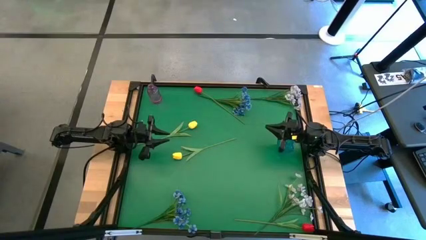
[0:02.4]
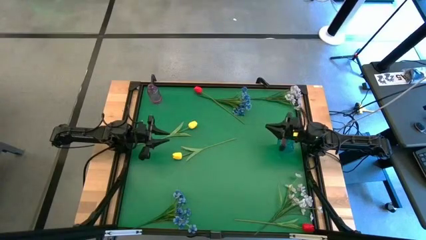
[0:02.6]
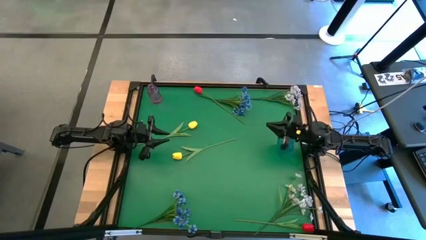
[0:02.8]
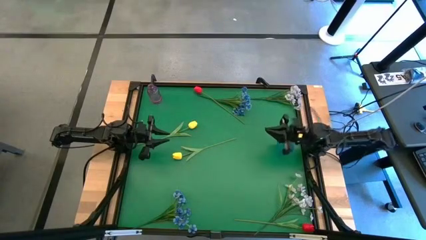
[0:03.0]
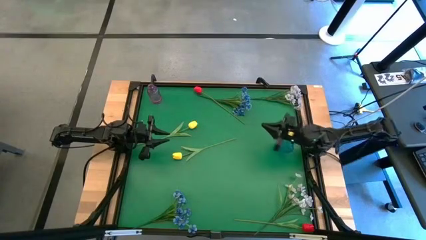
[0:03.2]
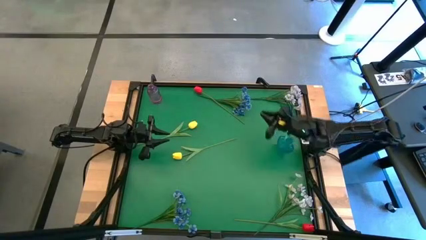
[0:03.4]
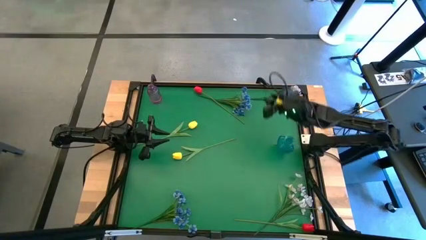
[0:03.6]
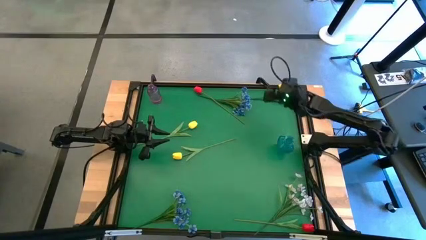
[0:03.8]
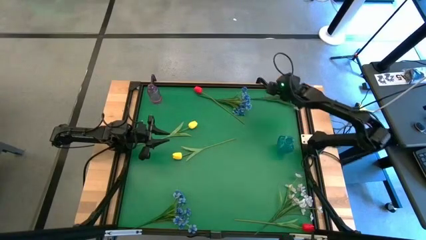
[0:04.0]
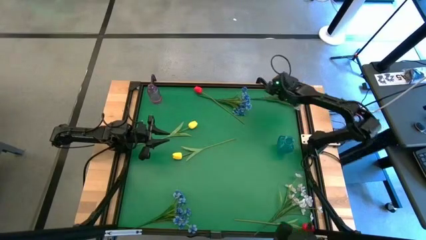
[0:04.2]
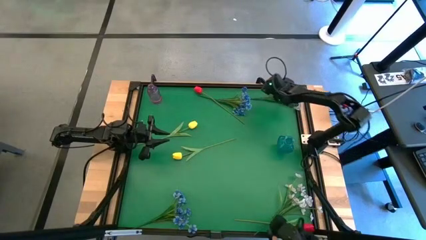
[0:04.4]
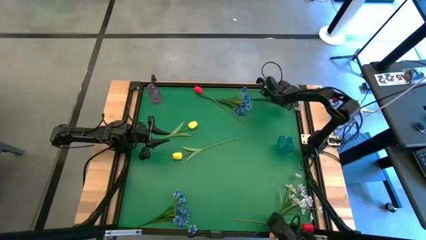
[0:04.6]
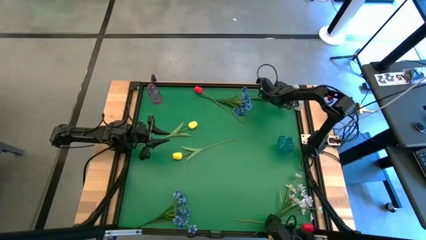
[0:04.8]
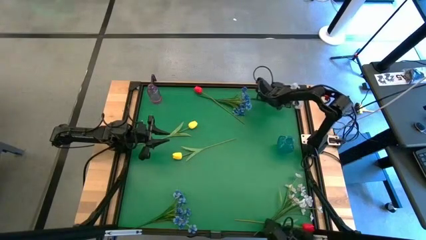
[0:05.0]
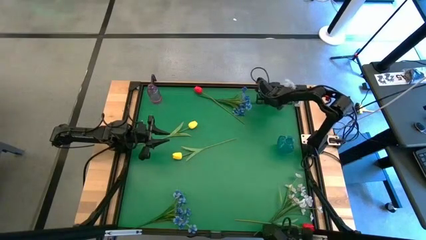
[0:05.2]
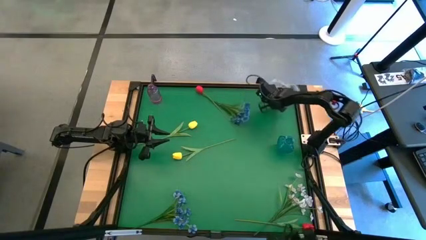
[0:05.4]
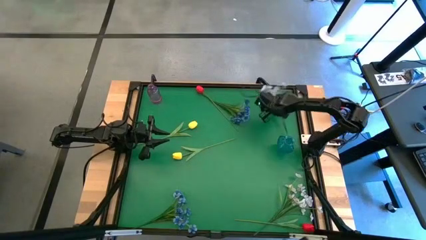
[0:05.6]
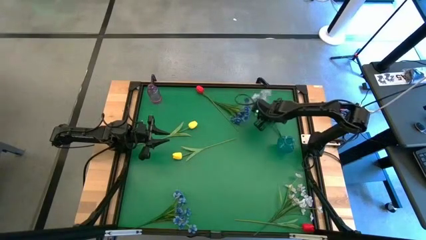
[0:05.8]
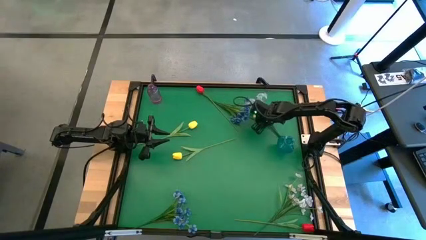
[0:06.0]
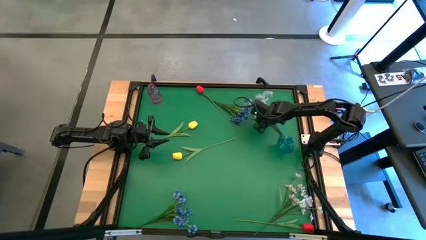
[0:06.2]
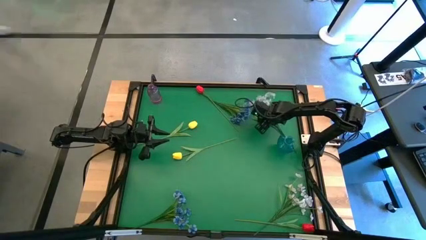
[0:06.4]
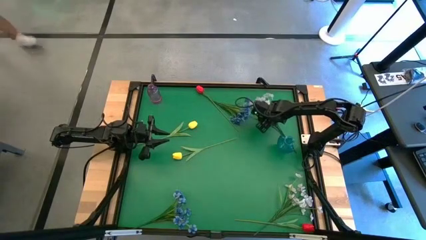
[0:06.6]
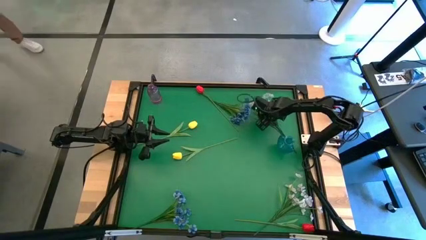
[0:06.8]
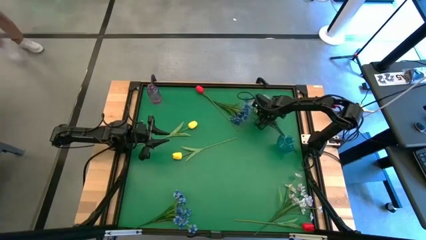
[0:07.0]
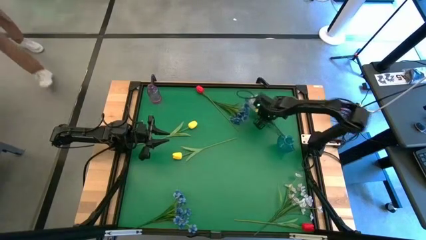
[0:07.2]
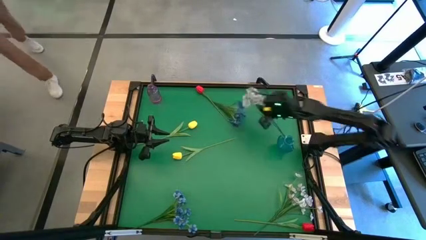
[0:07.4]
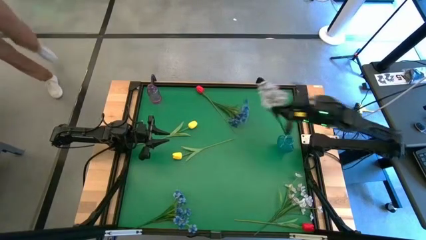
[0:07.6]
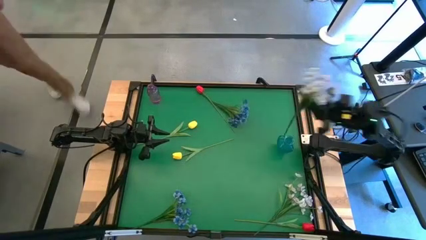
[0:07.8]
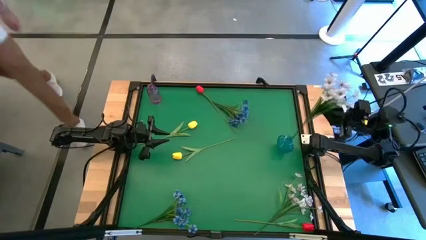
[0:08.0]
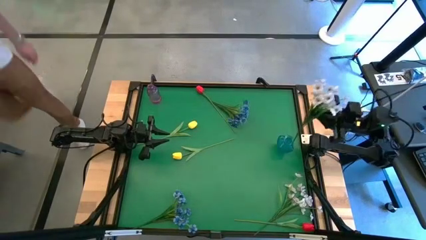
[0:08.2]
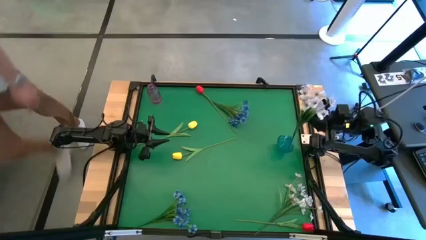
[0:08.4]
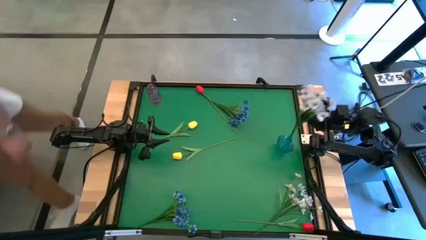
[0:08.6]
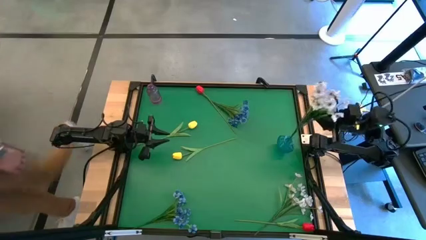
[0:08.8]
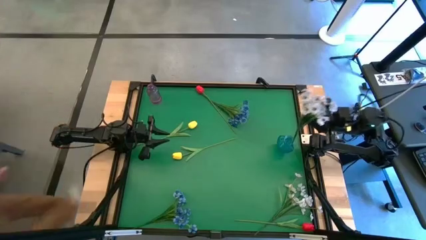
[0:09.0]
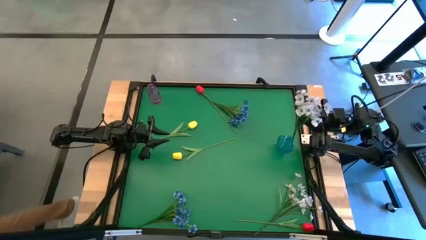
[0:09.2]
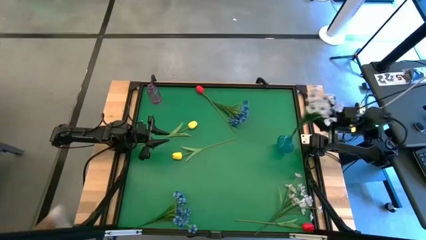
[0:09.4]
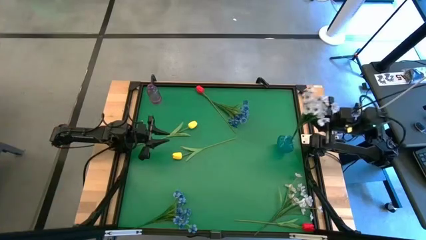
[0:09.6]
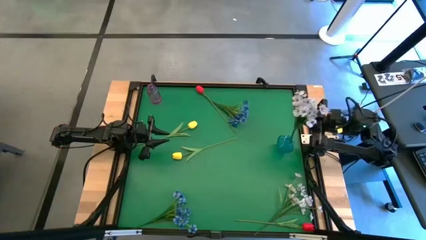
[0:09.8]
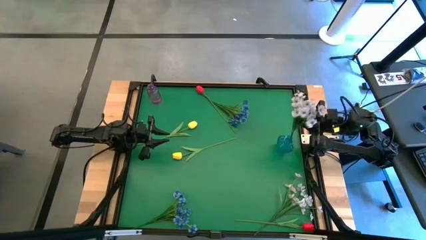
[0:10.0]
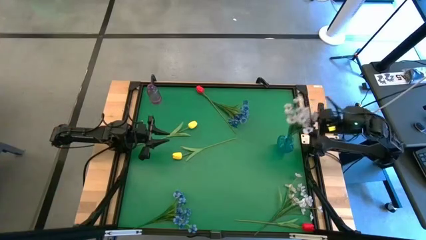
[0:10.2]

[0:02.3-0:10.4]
Task: Sort flowers into vase by color
Put the top white flowers into the blue vase

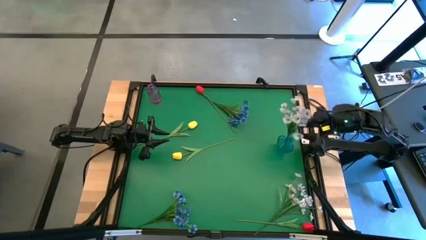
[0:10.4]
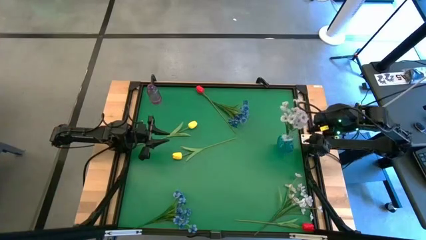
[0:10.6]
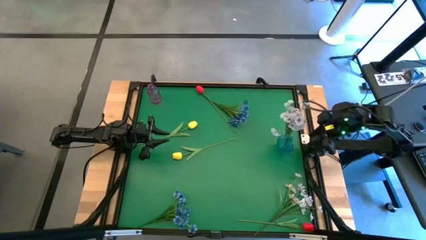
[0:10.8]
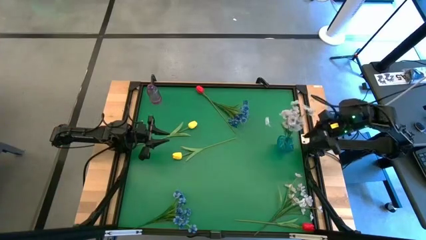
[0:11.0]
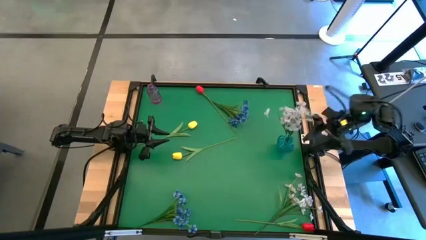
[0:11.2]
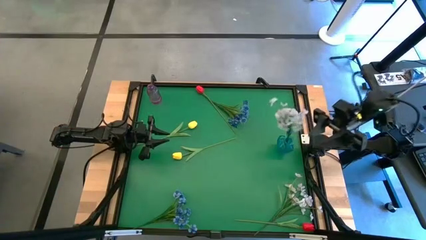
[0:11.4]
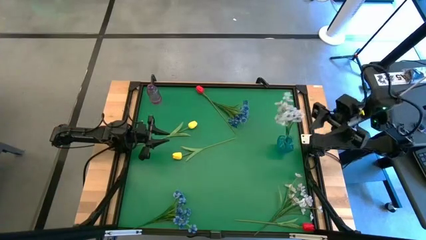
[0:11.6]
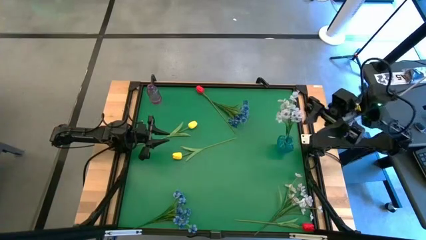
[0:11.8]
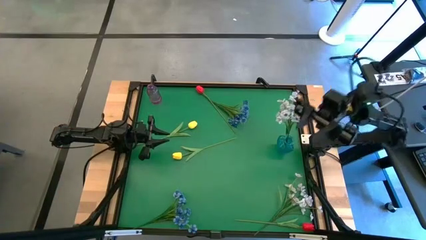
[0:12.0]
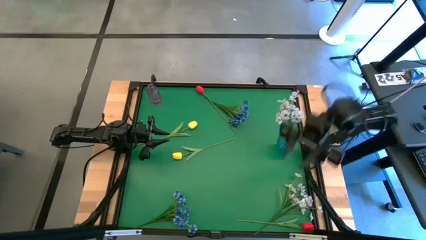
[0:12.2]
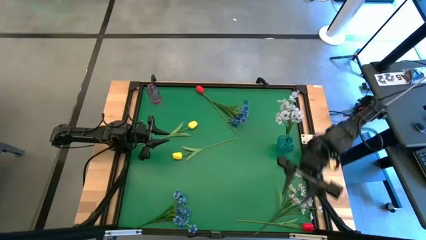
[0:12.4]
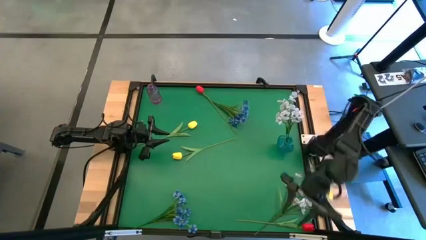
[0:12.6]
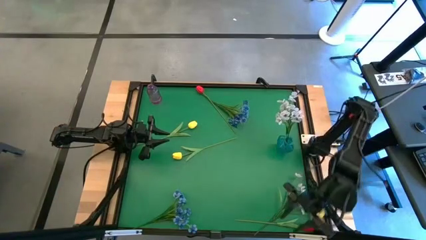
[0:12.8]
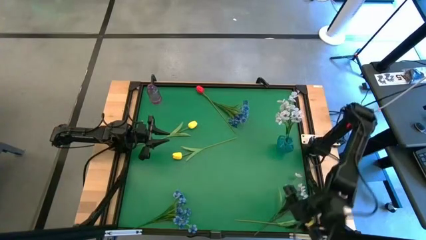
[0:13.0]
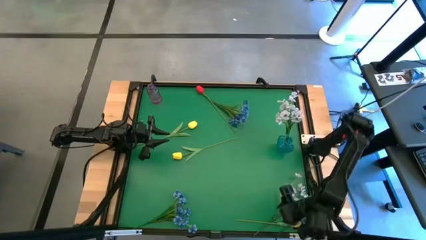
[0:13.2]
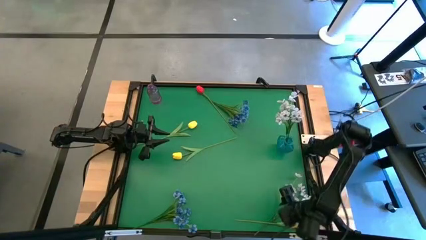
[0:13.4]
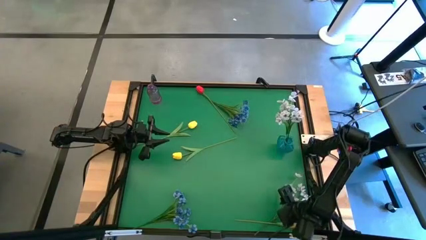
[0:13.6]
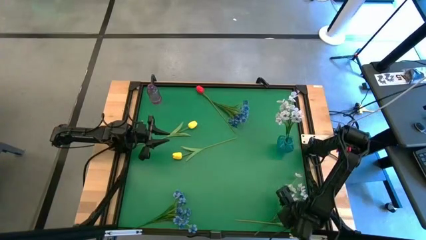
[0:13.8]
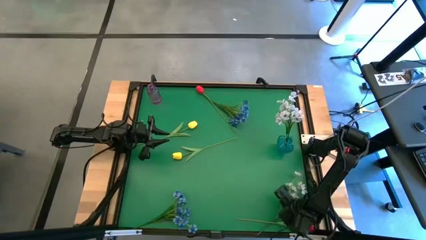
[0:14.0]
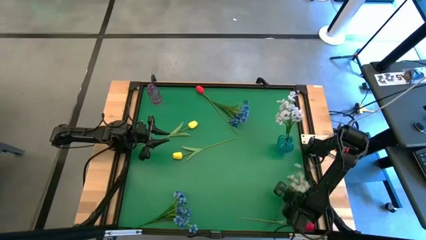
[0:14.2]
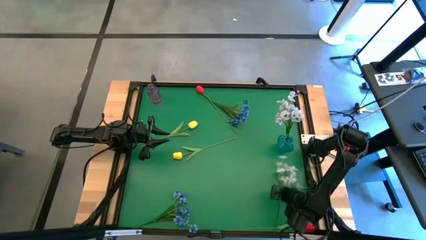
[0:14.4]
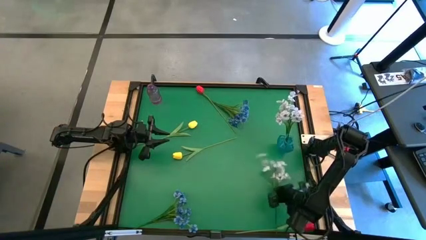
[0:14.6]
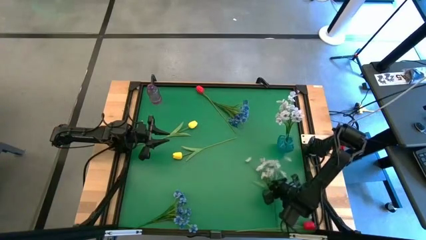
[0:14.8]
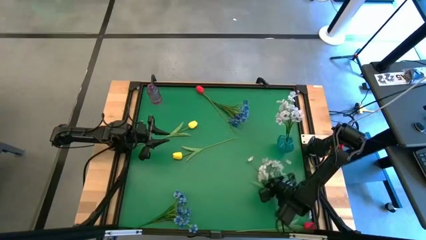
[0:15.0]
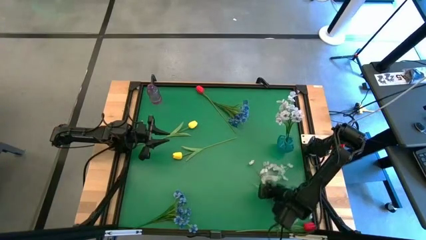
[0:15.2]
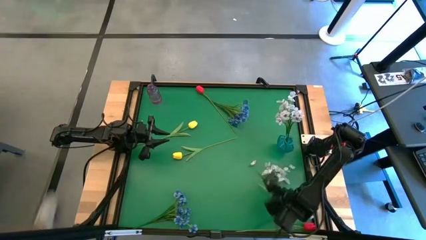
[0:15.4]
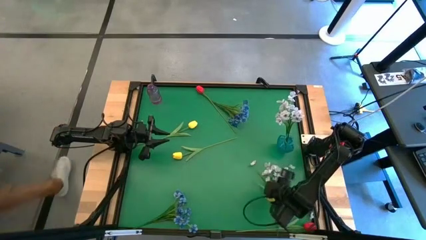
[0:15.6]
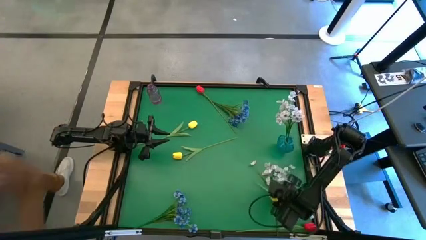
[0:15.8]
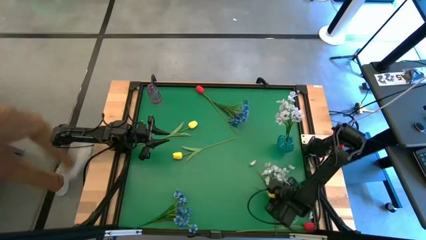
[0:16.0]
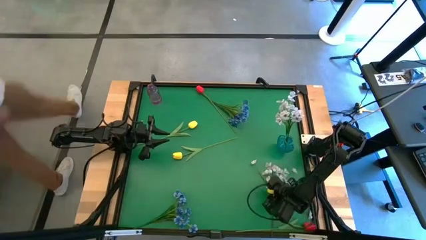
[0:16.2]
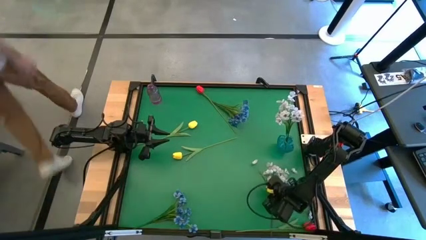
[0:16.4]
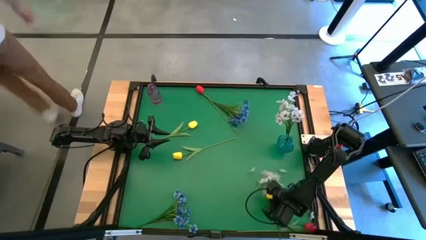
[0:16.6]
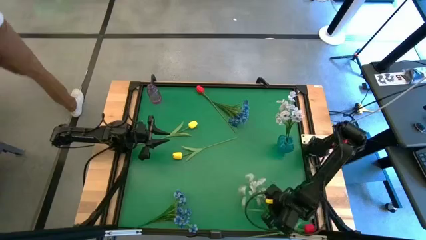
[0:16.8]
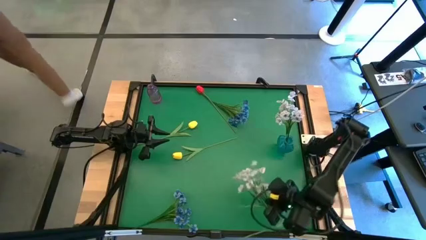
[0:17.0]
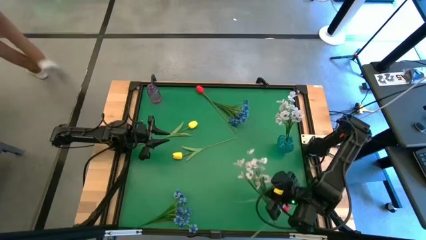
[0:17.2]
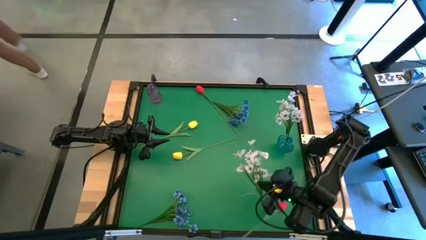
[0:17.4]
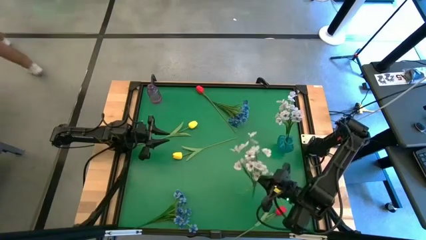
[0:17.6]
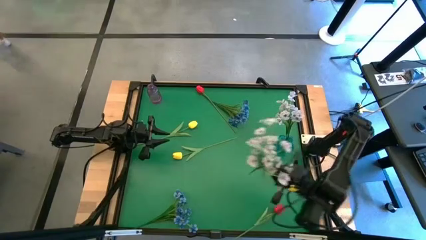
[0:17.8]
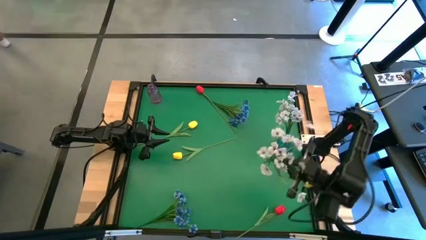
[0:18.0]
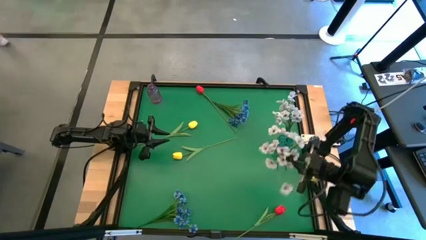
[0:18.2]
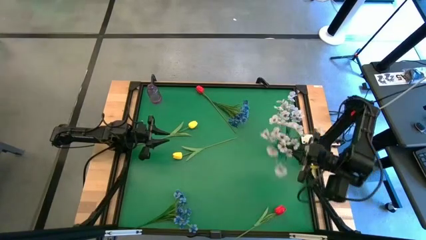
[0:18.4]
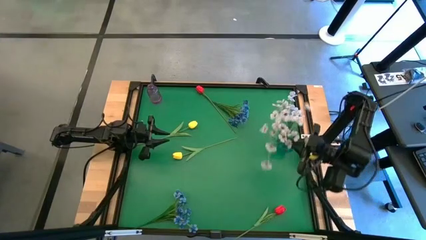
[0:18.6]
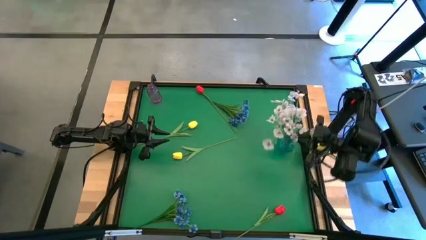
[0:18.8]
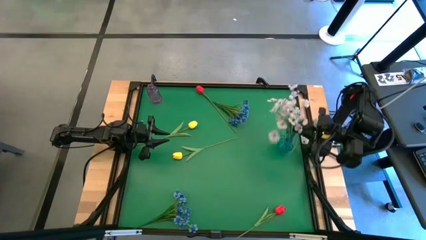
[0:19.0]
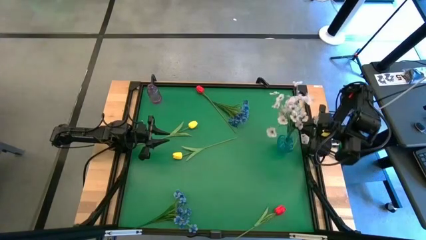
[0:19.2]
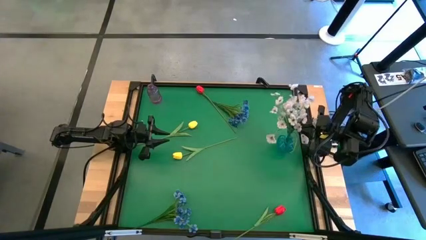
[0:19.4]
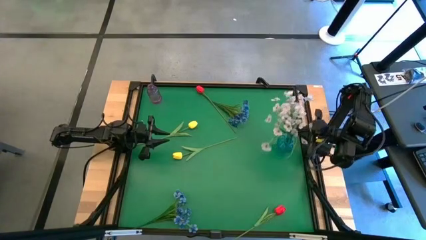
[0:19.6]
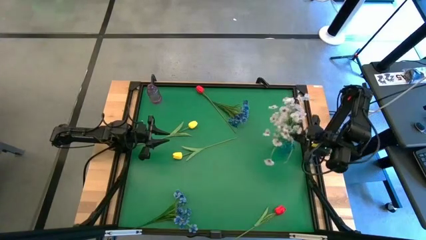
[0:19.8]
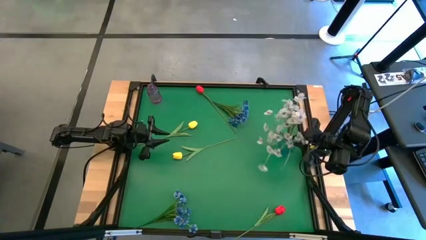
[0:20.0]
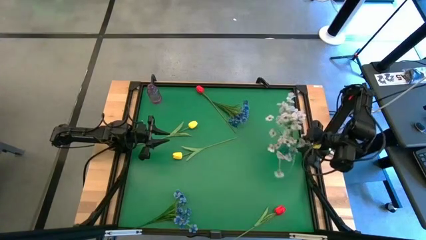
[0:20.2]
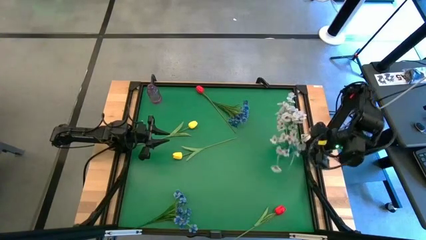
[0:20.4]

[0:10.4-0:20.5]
Put the white flowers into the blue vase
